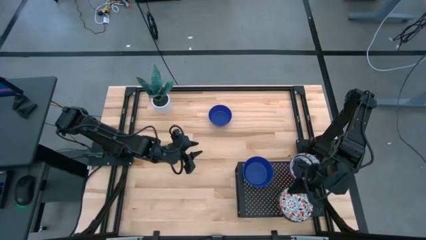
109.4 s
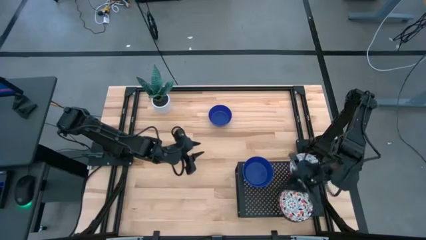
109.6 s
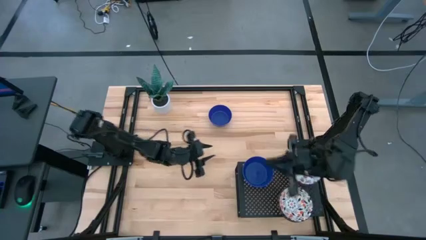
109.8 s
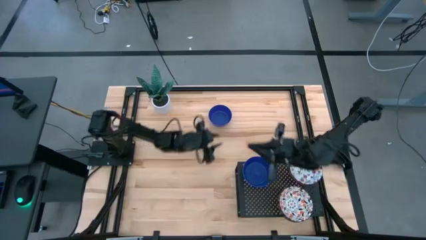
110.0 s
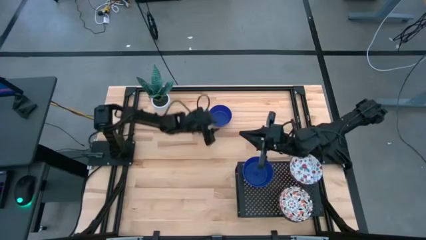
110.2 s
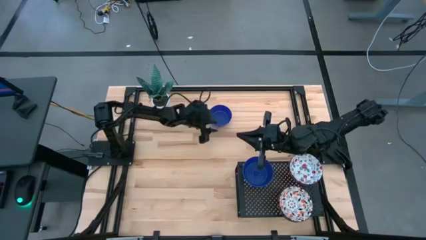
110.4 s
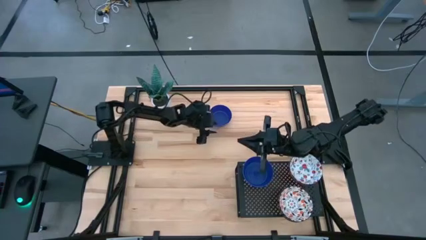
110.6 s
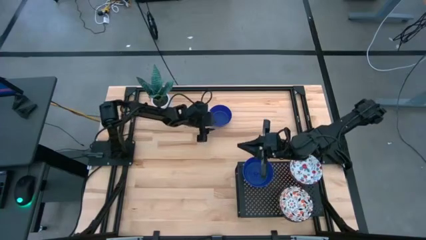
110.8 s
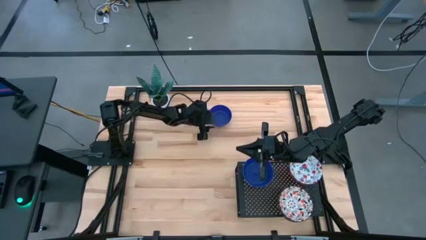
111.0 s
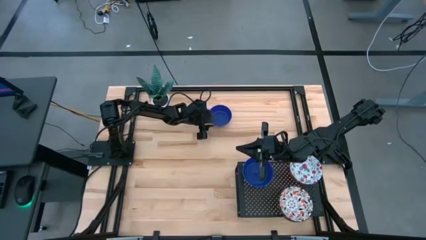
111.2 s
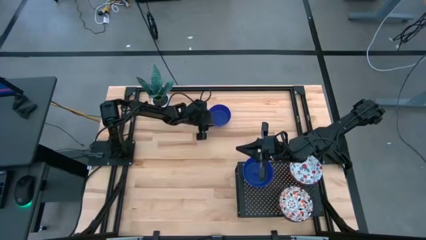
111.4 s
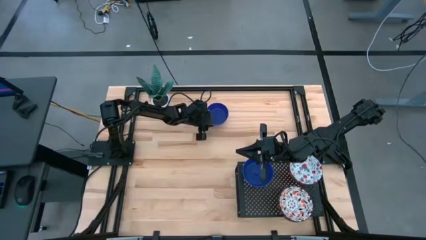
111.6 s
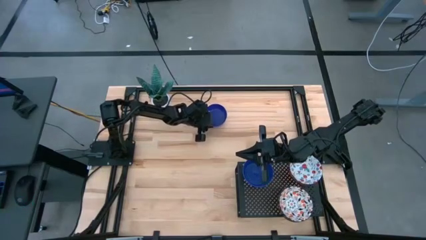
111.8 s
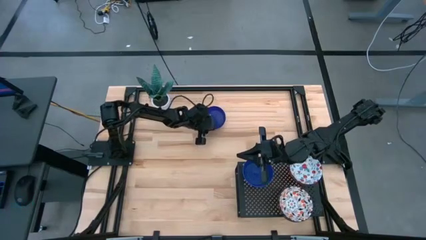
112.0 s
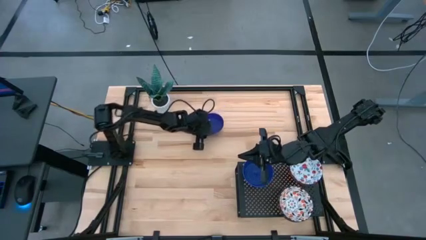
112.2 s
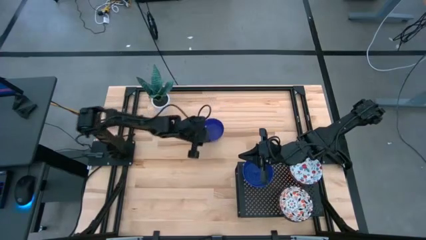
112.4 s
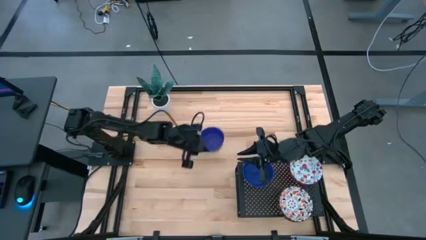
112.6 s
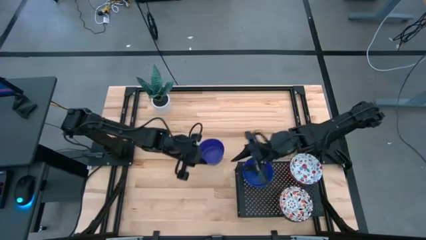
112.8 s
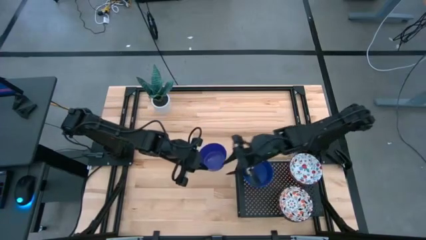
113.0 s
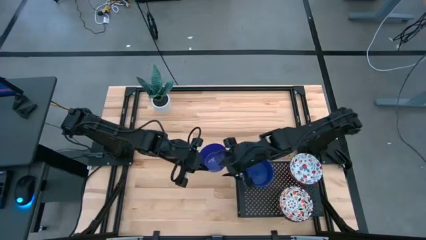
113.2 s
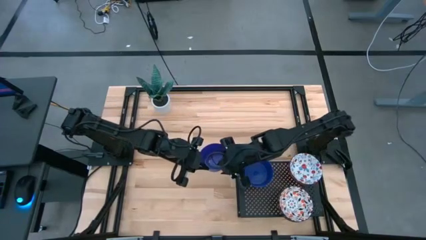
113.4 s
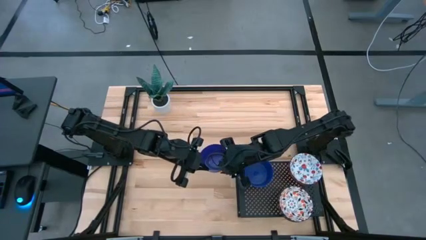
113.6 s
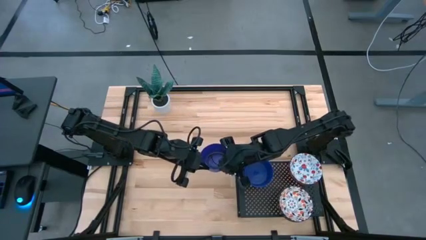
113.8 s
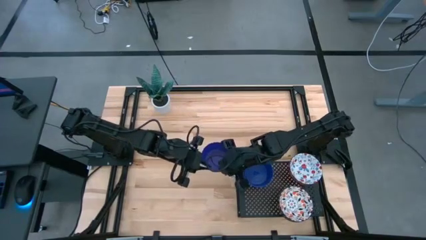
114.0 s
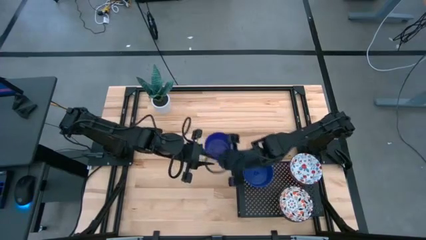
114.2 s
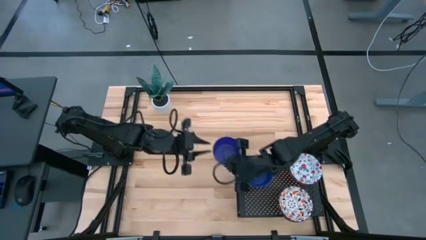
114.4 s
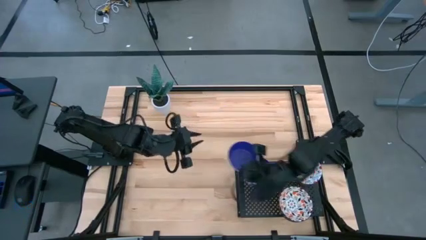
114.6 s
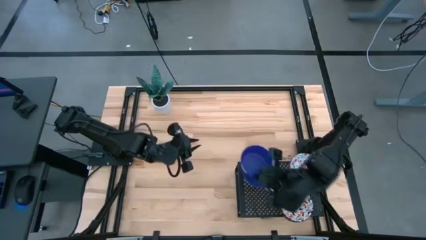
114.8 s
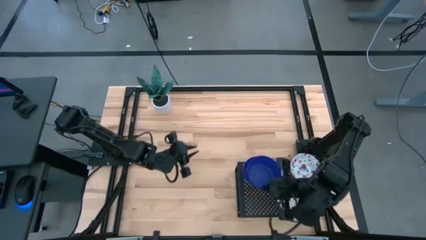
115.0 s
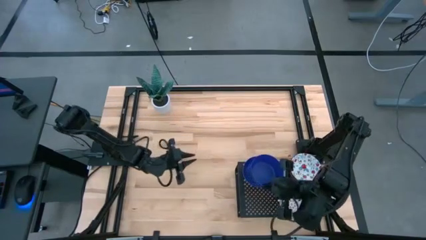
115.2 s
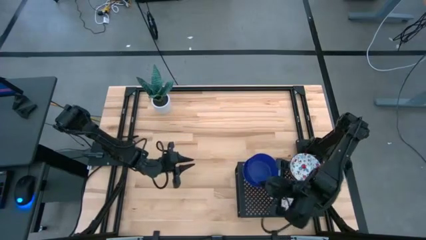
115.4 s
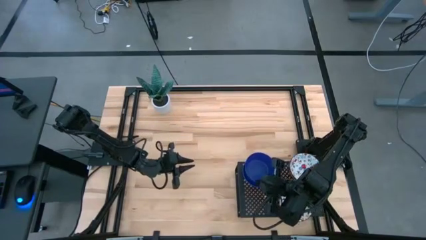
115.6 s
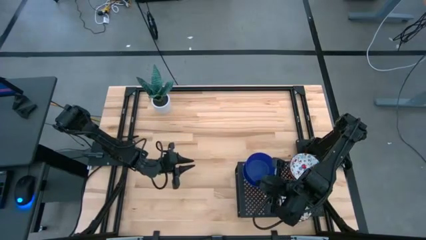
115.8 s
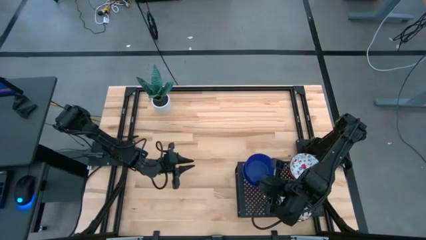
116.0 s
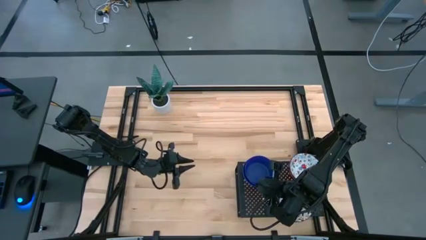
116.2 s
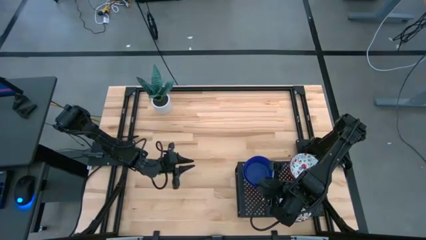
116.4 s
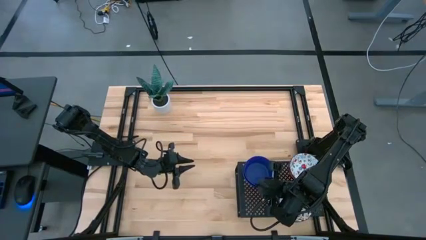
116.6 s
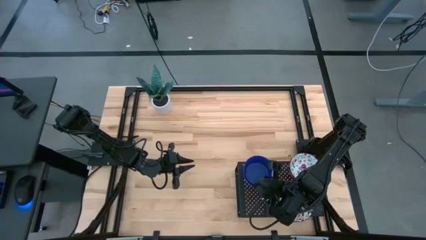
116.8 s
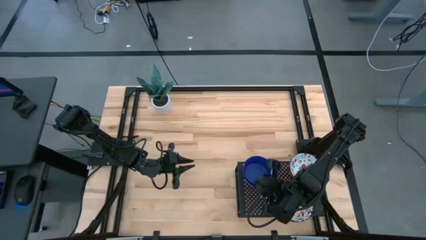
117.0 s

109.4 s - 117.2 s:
Task: Pick & Place Mini bowls
Stack the blue bowl on the blue bowl on the shelf

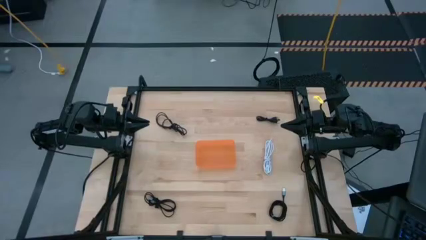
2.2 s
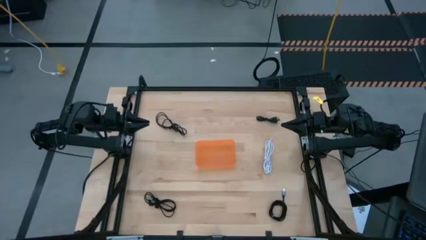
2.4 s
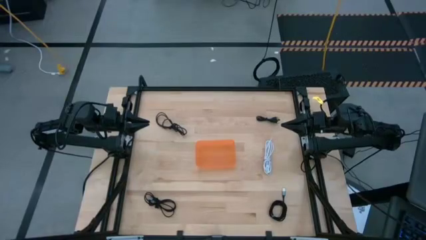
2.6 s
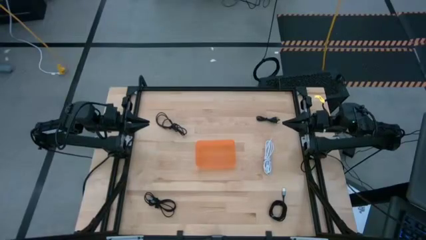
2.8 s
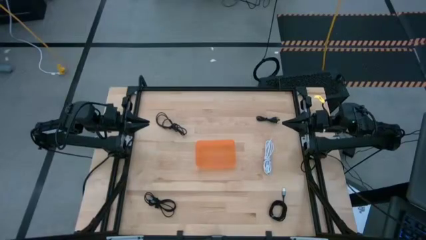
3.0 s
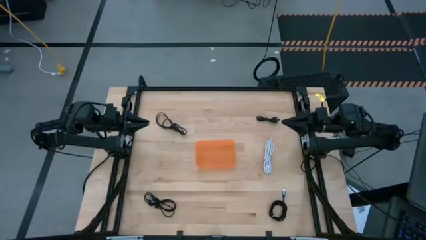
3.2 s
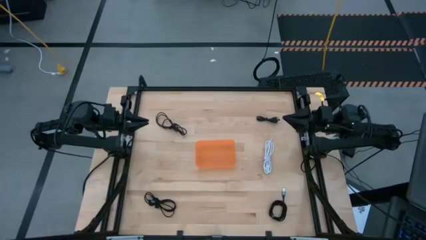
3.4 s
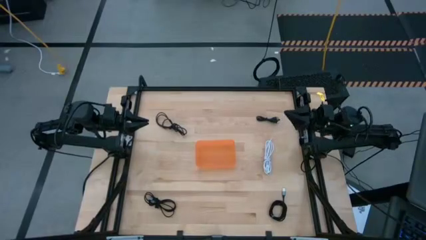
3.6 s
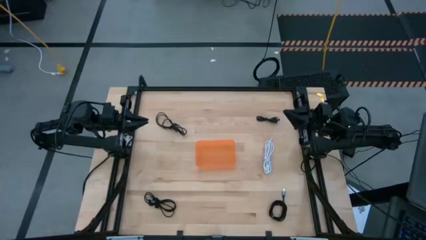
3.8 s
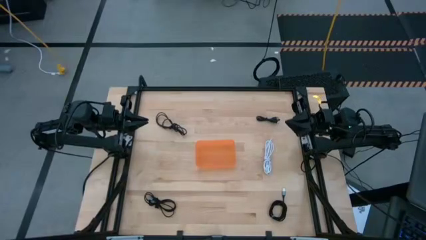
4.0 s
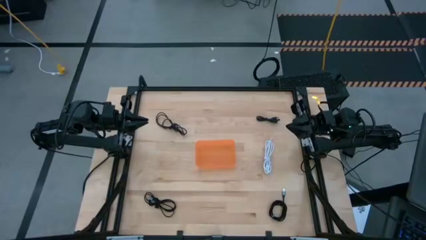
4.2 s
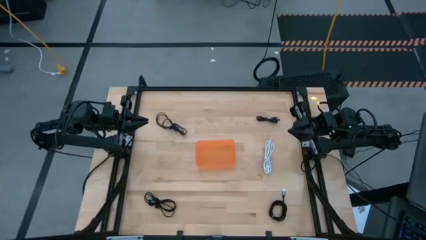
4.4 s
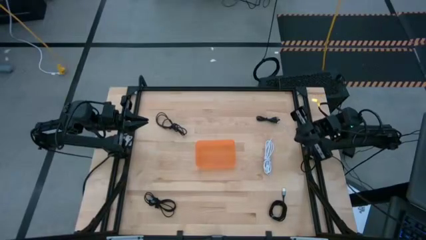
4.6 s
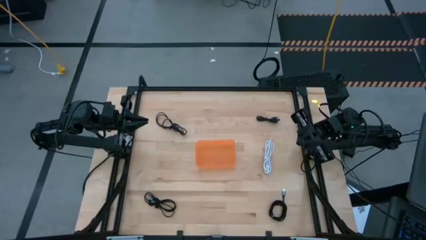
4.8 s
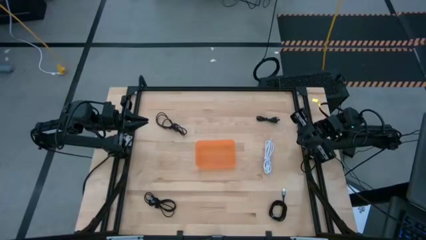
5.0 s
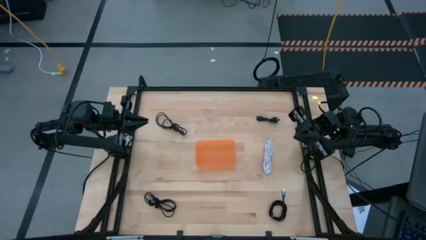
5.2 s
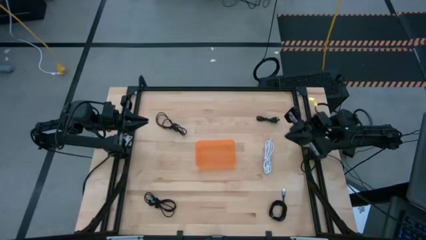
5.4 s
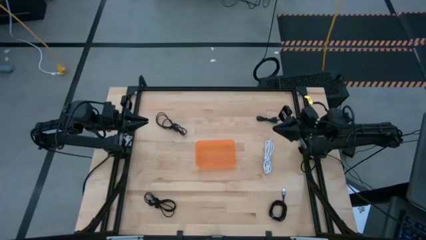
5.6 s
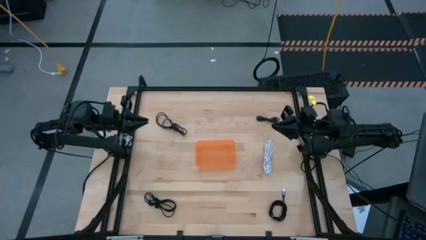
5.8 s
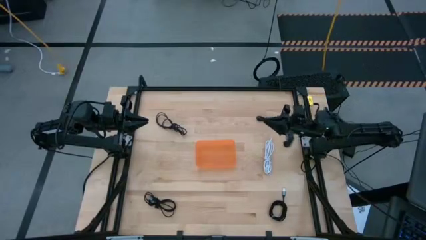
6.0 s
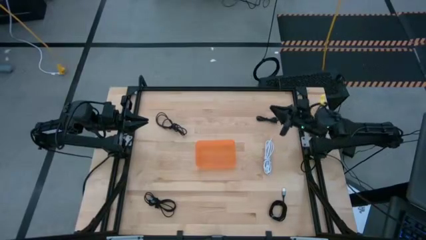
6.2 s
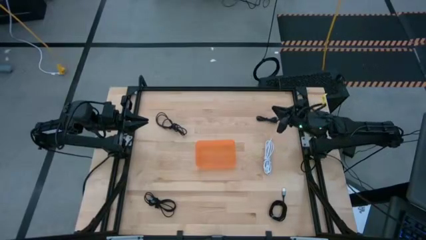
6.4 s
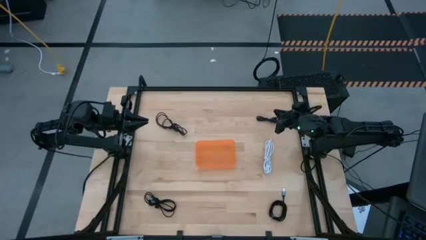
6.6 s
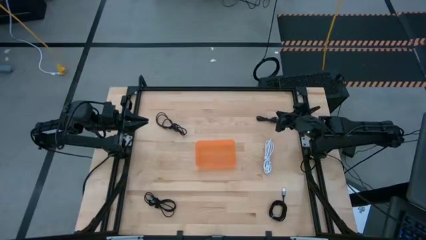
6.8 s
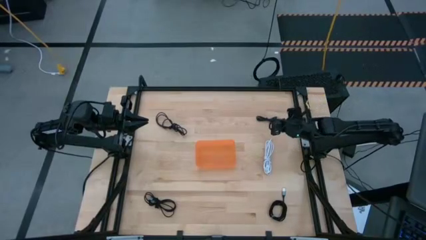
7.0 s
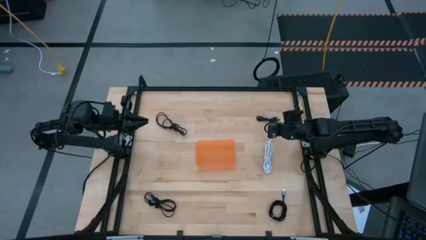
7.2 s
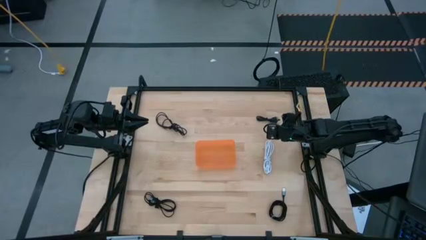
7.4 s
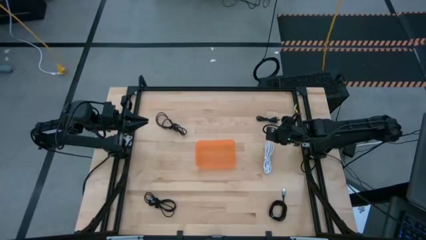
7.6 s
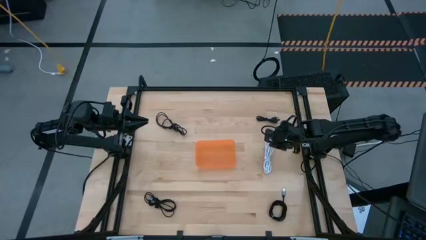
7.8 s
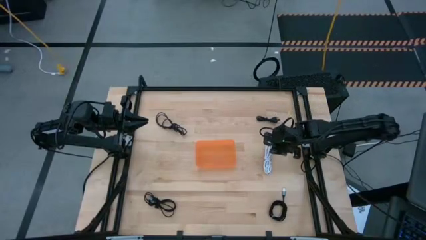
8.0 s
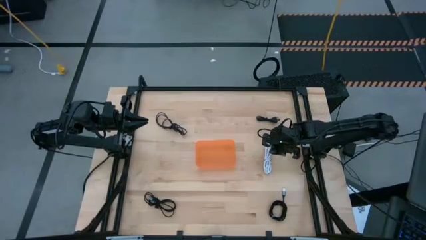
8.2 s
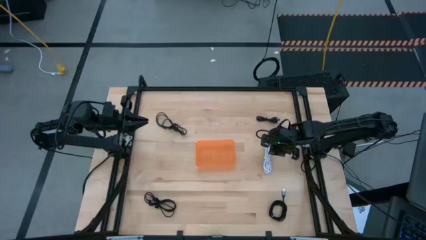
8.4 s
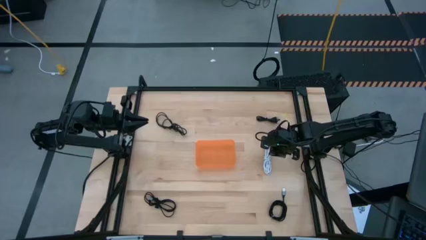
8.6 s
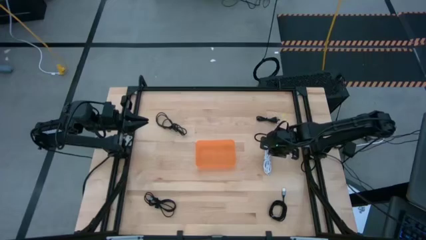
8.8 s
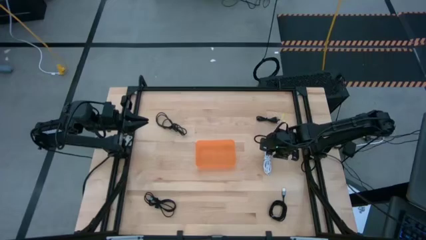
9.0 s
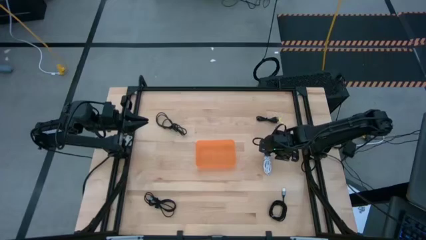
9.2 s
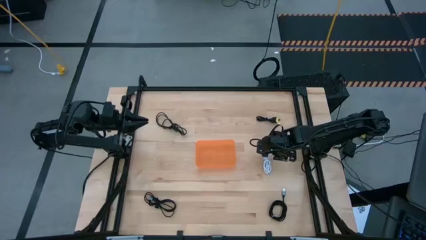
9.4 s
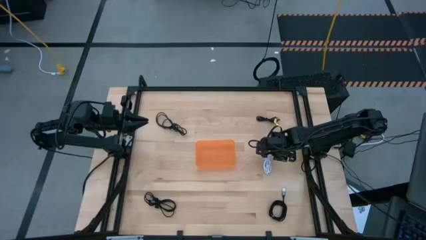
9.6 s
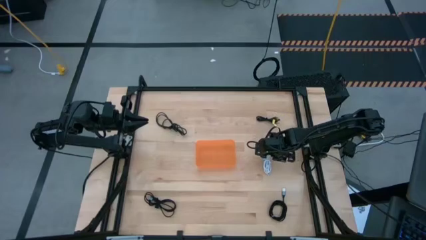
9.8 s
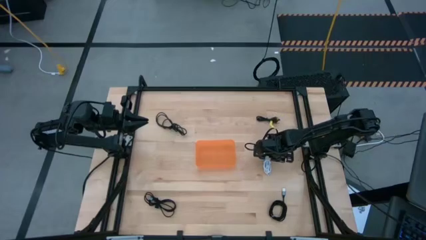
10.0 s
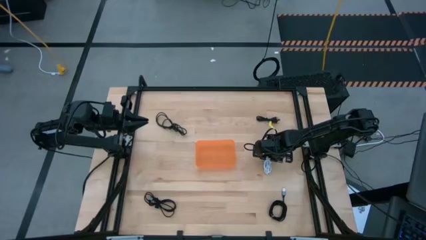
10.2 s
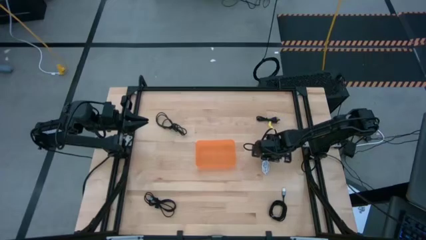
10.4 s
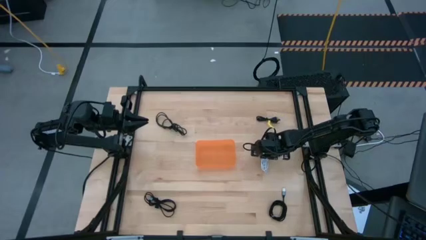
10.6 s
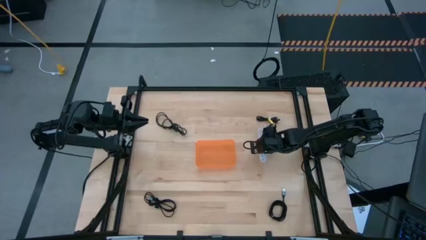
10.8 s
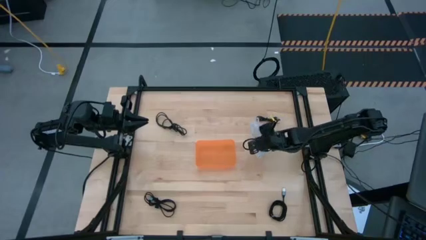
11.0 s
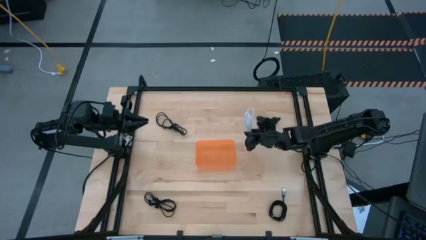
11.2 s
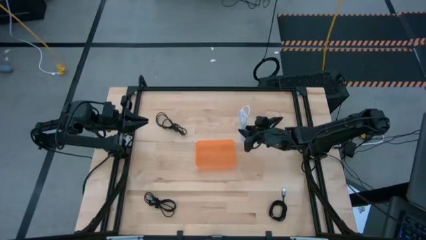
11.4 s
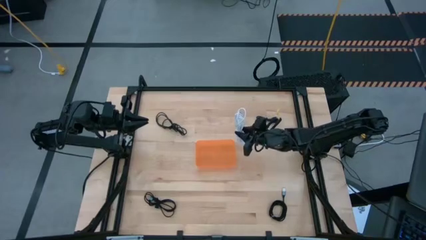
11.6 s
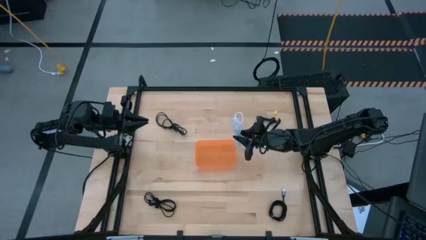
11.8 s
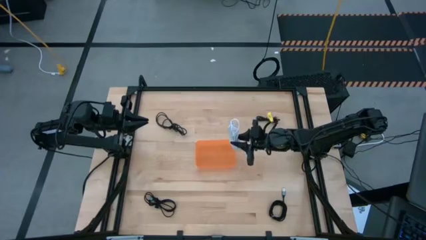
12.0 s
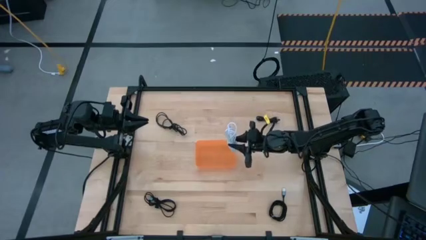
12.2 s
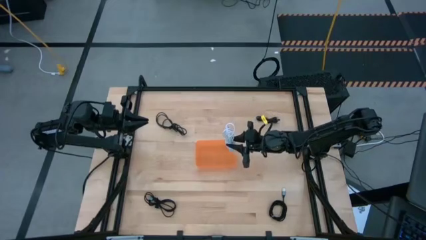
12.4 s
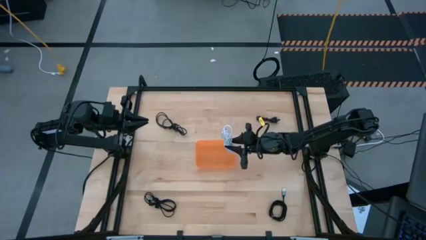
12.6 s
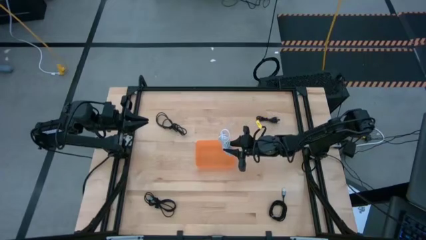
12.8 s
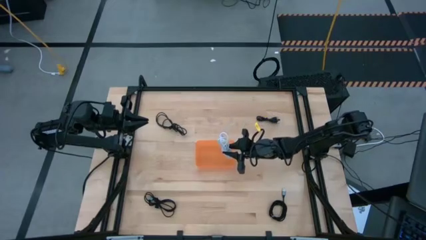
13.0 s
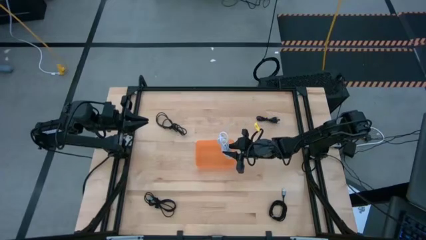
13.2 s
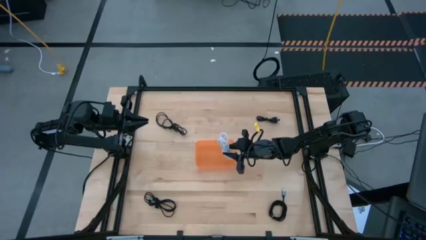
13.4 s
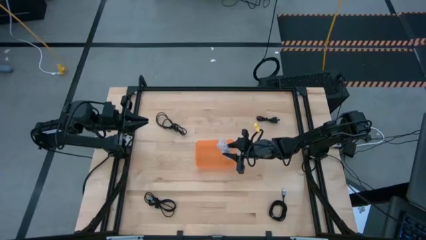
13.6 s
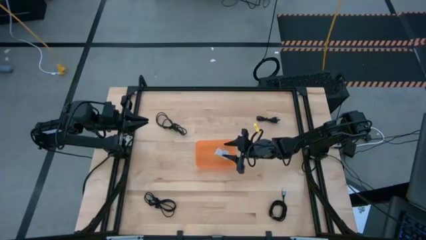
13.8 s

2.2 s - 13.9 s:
Task: Pick and place USB-C Cables
Put the white charger cable into the orange bin
